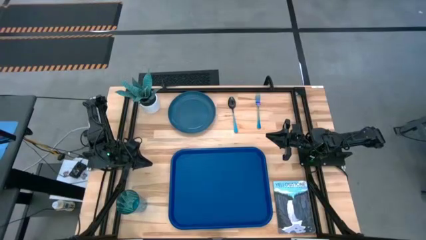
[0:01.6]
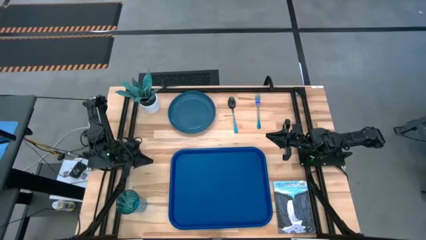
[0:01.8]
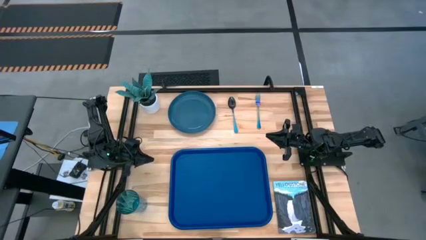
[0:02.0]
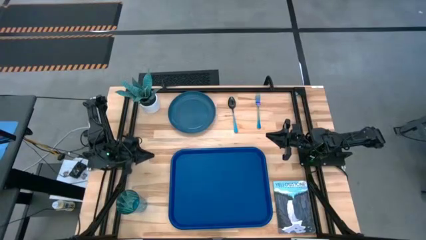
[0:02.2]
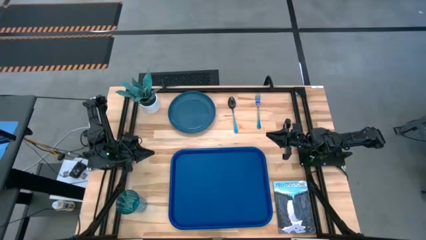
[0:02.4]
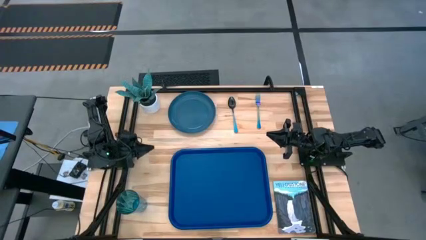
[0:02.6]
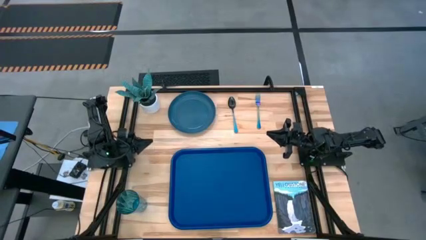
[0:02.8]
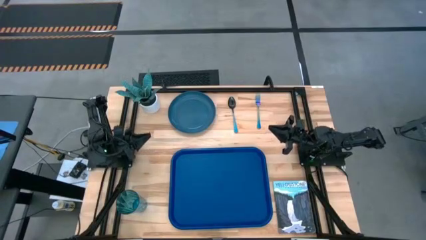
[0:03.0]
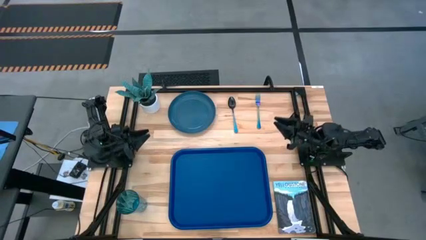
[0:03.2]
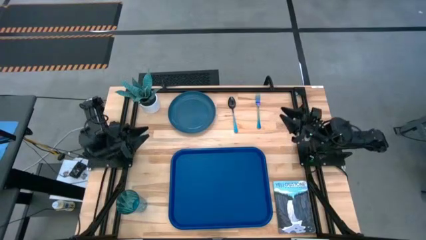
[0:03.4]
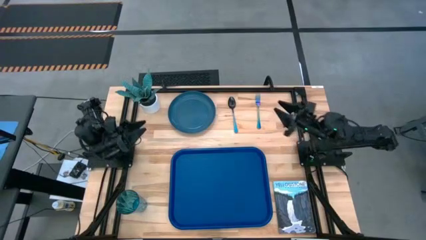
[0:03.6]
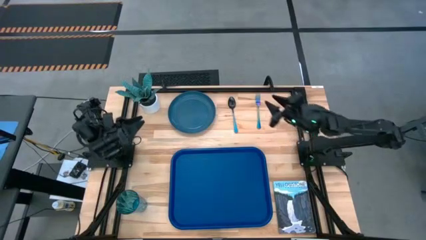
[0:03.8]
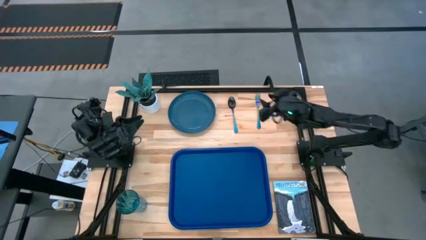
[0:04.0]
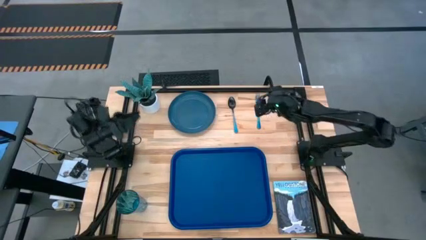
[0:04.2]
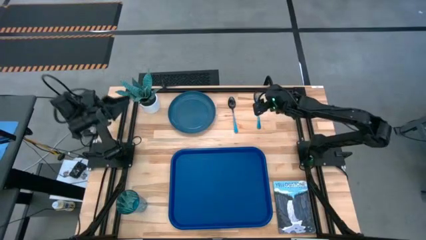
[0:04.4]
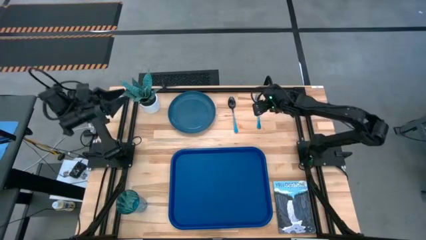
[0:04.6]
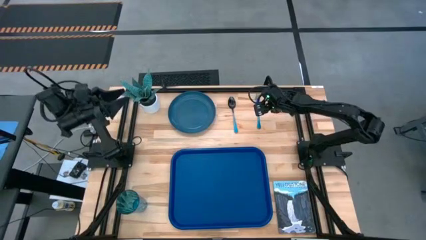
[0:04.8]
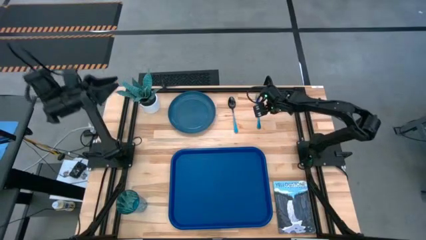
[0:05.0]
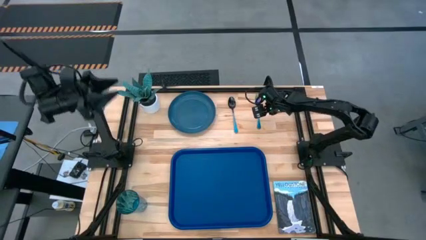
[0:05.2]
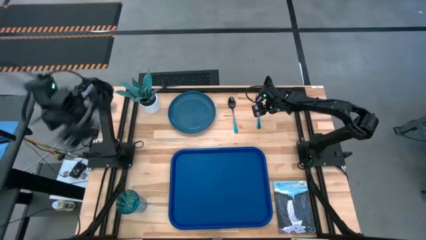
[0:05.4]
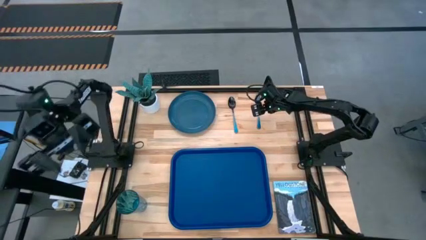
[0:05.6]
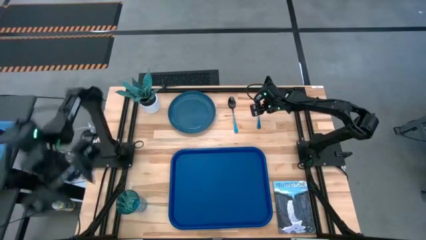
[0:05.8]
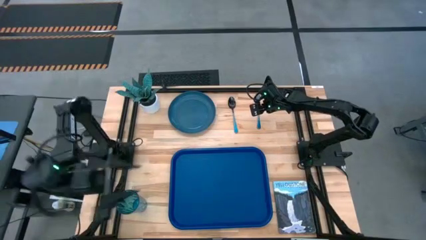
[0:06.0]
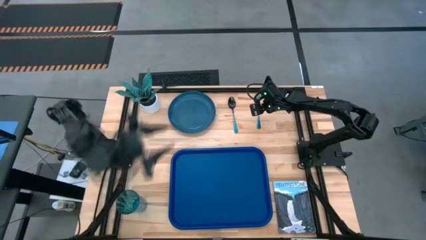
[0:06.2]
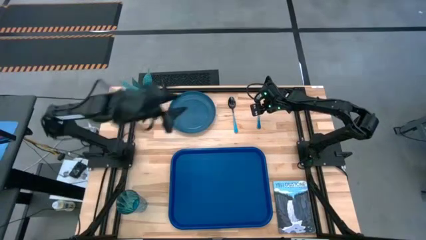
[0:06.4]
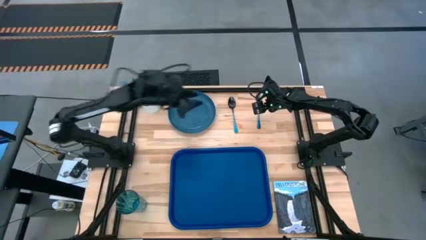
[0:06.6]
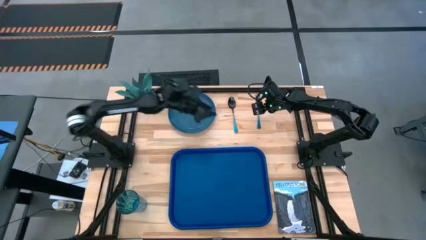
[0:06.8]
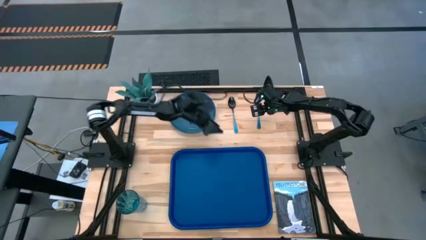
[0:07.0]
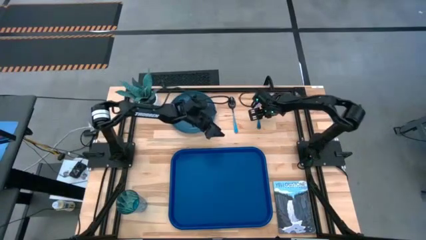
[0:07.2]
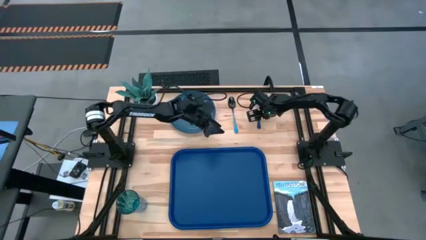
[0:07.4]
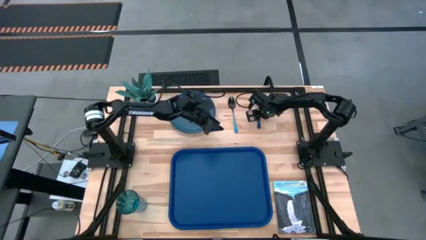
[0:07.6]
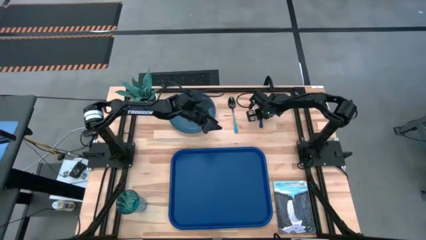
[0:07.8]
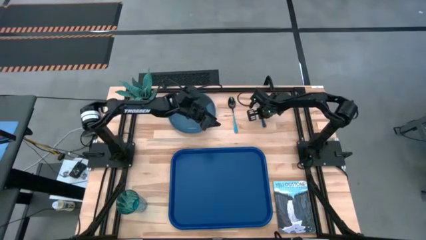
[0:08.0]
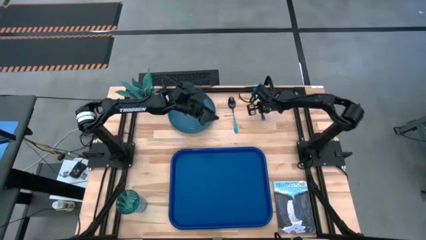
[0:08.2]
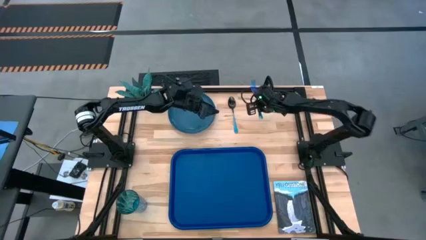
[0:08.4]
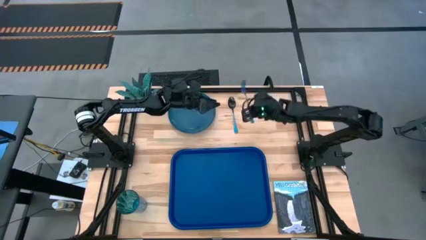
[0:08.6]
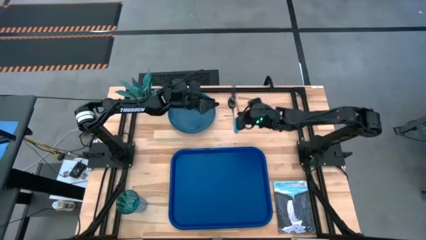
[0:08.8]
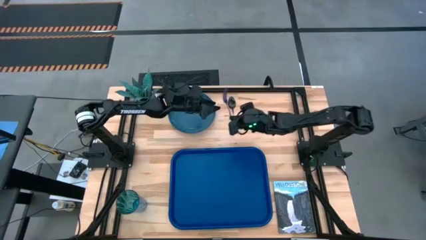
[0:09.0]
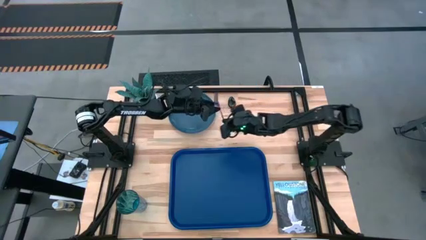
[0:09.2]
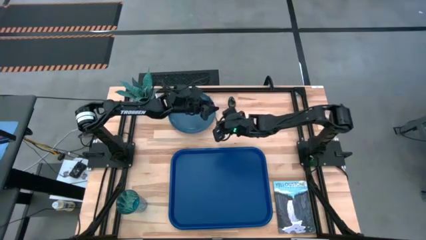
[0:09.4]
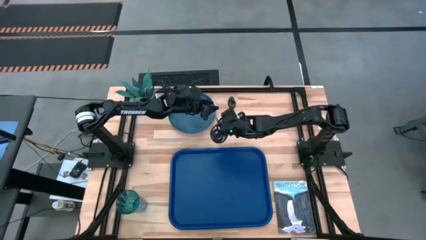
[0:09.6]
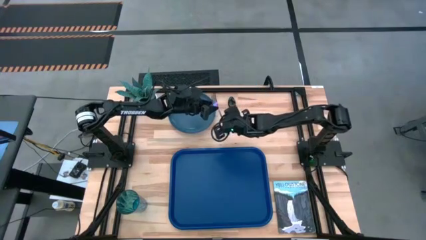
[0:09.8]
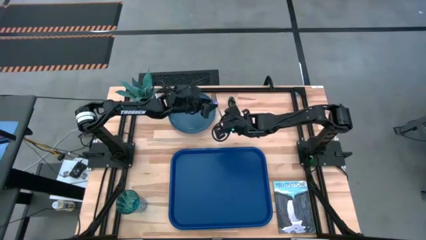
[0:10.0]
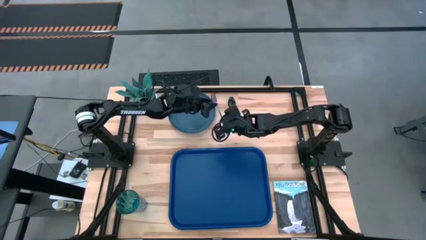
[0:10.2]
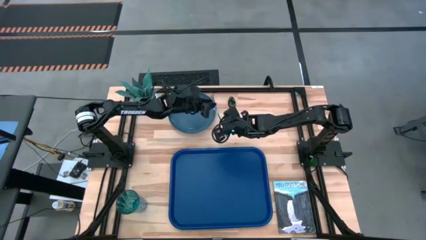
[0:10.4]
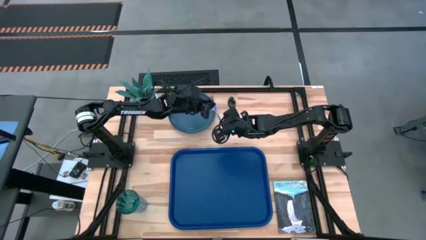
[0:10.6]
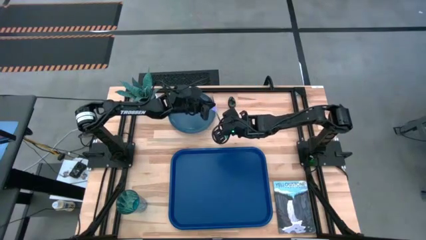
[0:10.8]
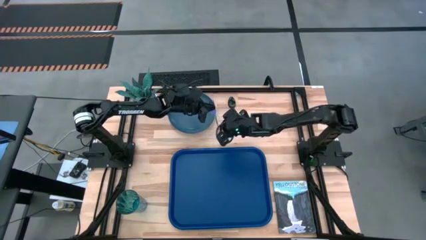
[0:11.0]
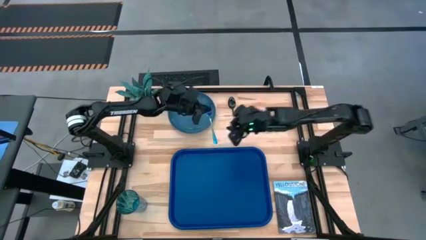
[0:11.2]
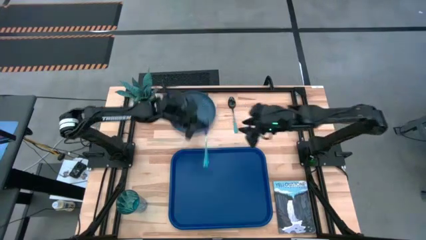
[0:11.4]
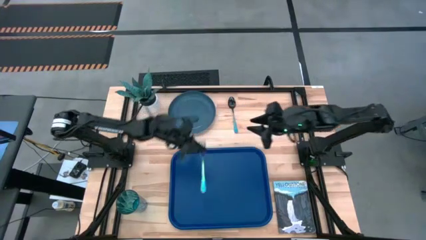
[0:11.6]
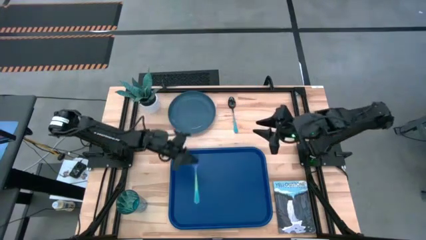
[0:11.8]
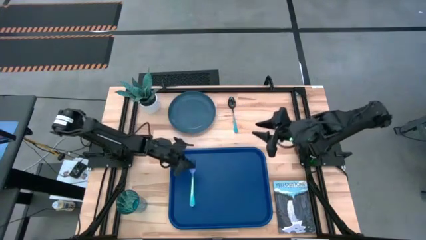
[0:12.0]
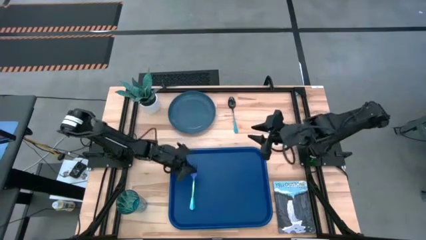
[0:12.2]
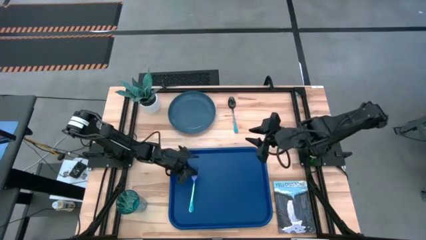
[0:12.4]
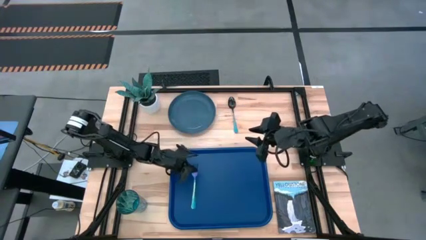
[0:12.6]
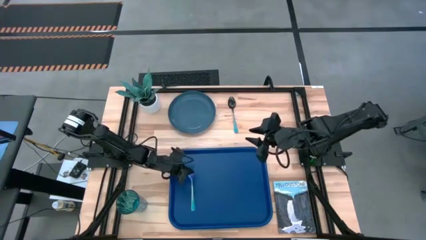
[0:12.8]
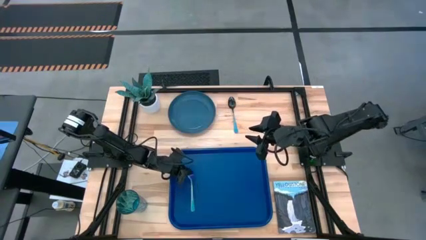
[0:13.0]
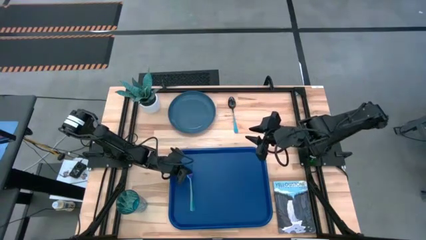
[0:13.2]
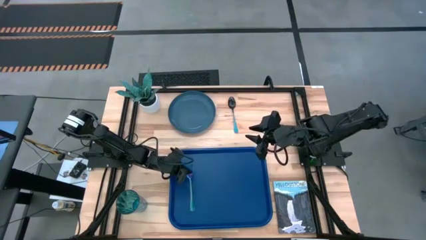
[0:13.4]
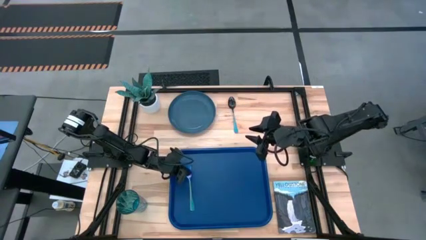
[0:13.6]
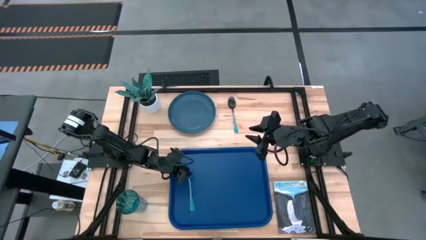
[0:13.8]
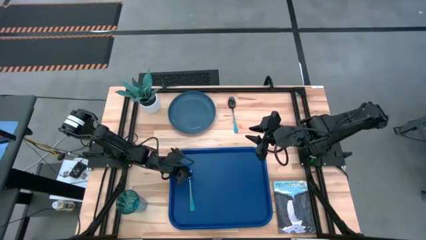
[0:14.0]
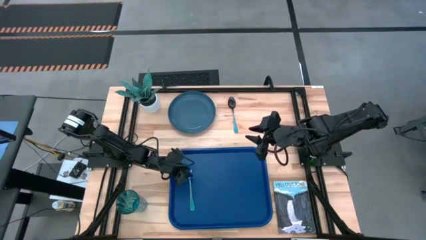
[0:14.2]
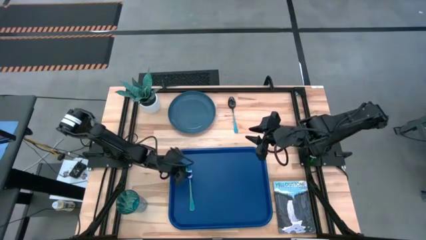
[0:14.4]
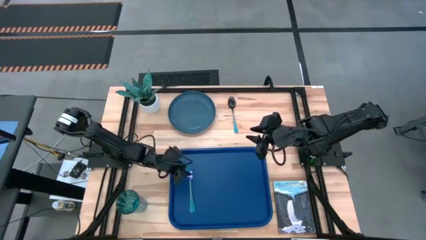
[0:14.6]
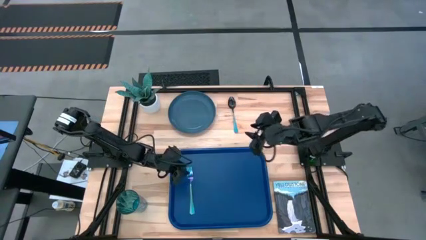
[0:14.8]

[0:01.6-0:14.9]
Task: Pick and place plate/cup/fork/spoon on tray
Put the iridescent fork on the blue tray

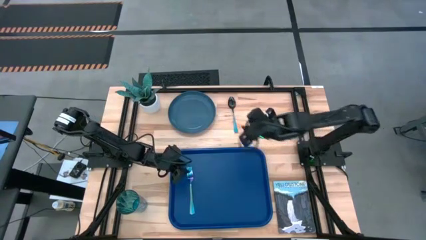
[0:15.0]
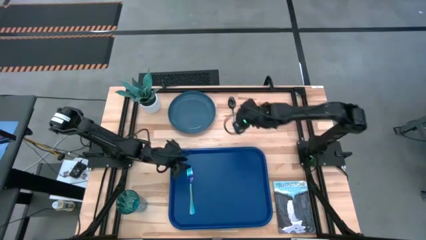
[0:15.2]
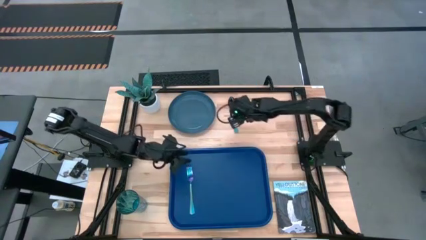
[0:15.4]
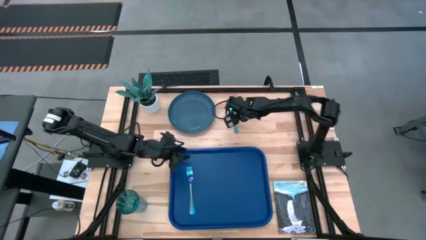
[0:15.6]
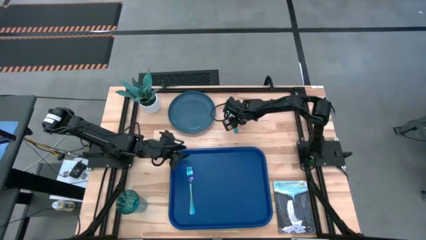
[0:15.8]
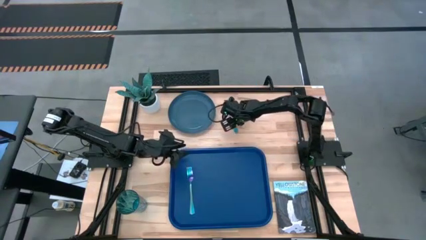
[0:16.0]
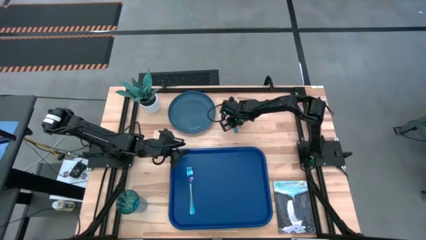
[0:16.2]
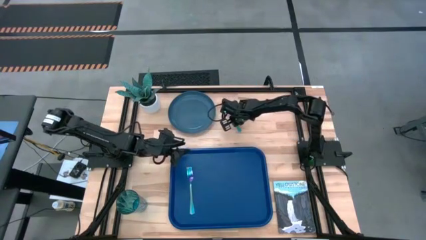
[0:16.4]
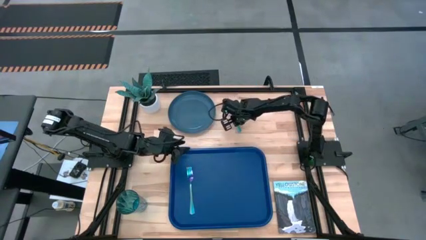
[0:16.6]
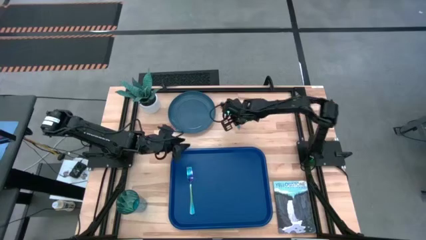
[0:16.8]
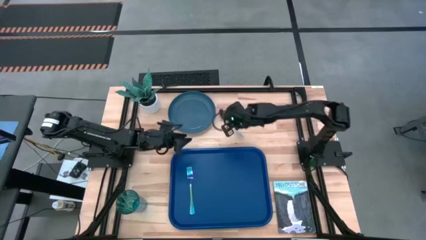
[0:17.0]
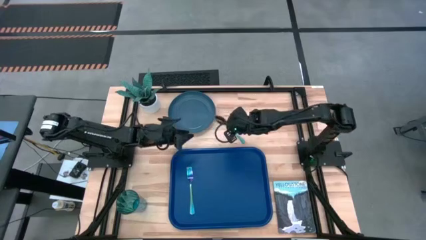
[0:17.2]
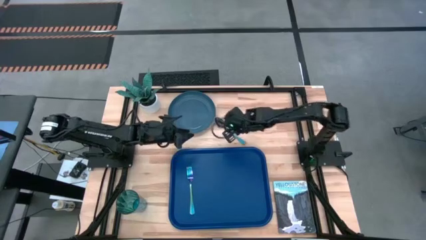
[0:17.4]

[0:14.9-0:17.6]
Put the blue spoon on the blue tray
